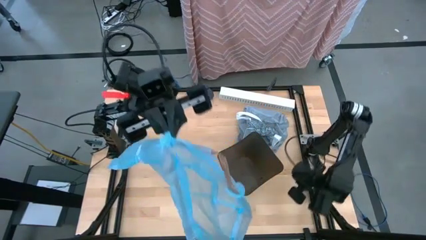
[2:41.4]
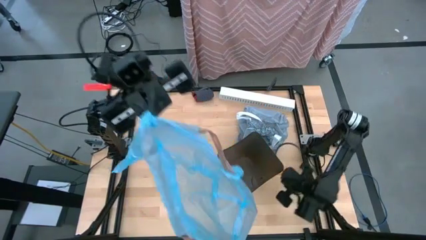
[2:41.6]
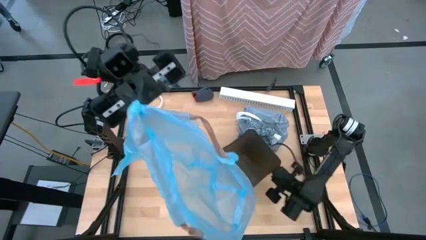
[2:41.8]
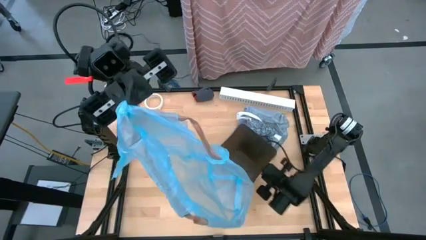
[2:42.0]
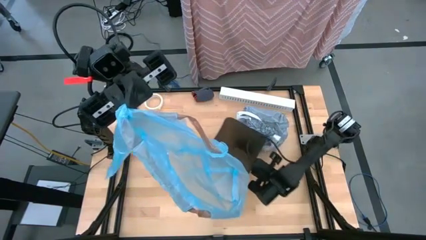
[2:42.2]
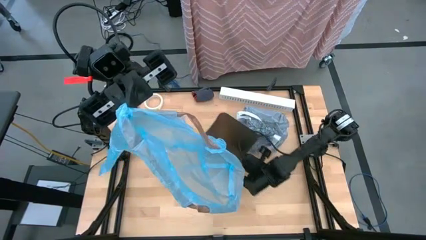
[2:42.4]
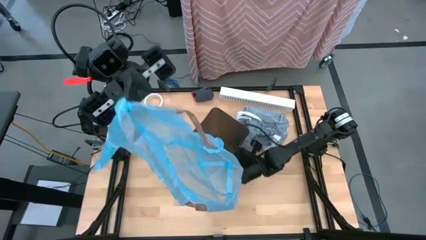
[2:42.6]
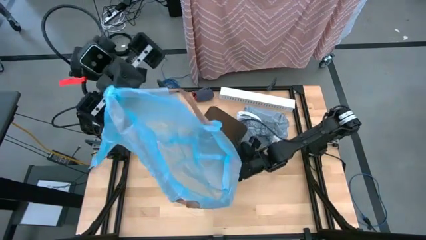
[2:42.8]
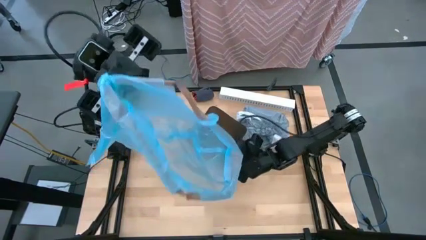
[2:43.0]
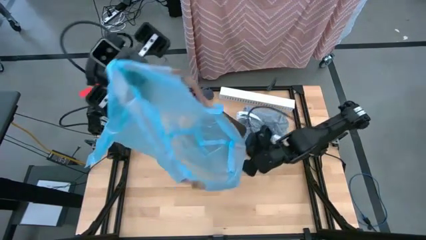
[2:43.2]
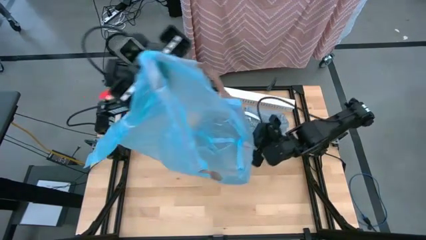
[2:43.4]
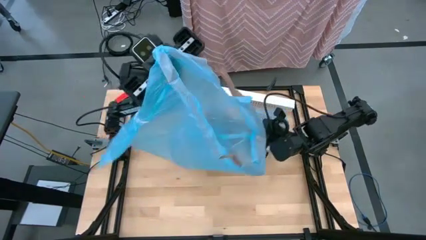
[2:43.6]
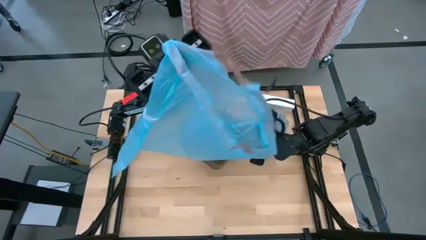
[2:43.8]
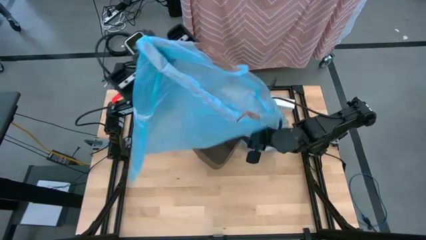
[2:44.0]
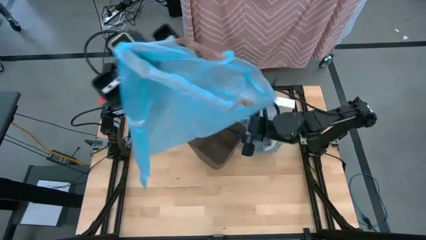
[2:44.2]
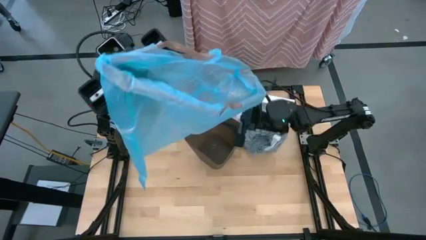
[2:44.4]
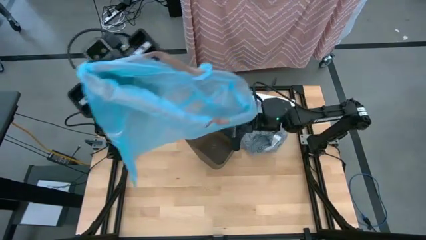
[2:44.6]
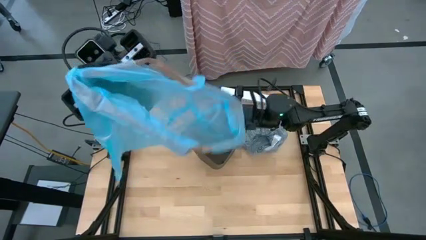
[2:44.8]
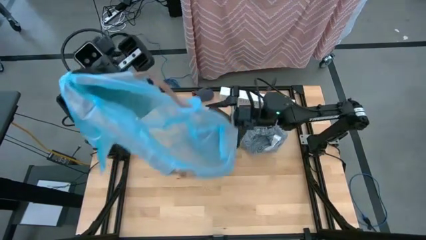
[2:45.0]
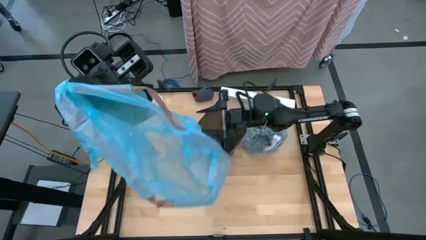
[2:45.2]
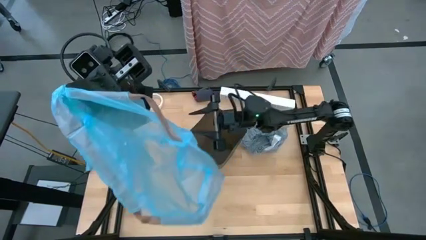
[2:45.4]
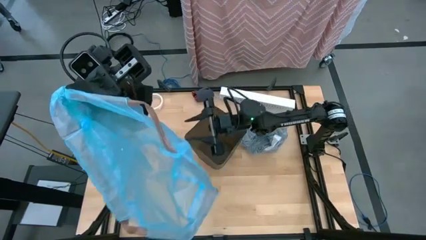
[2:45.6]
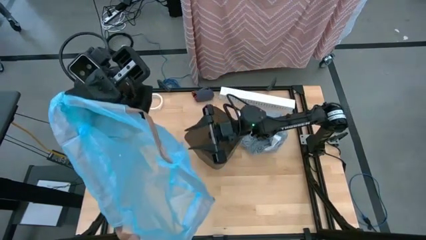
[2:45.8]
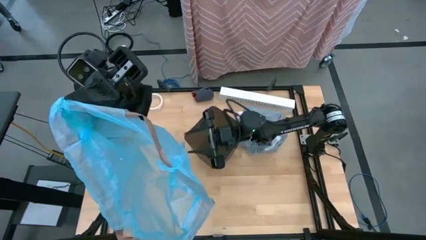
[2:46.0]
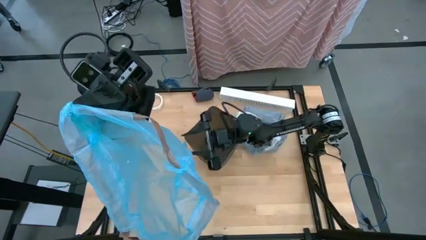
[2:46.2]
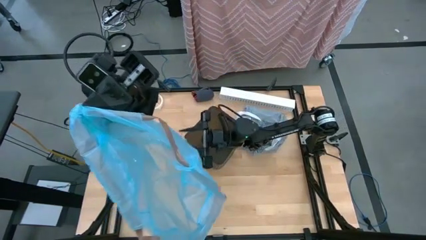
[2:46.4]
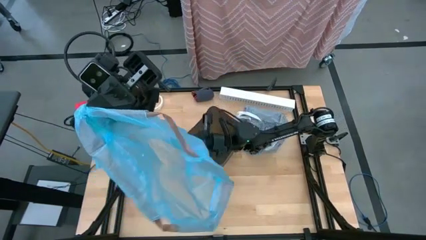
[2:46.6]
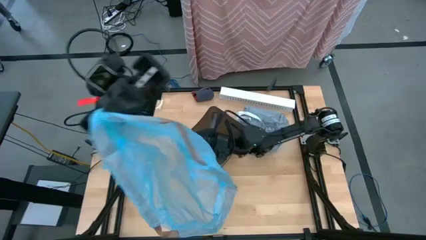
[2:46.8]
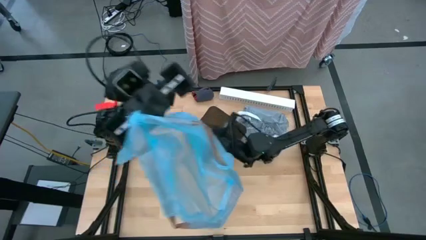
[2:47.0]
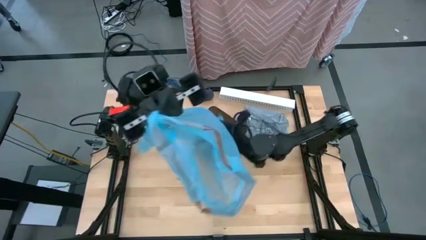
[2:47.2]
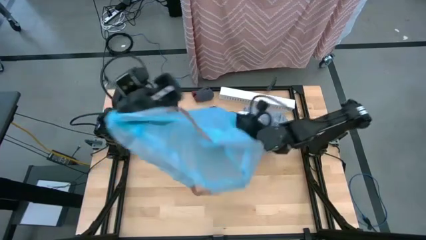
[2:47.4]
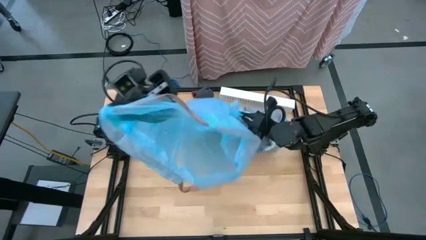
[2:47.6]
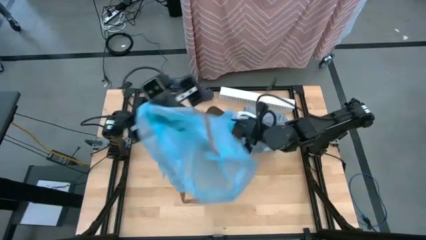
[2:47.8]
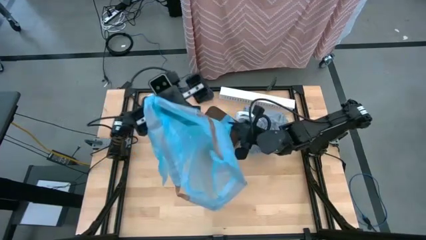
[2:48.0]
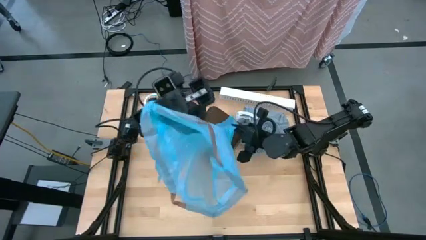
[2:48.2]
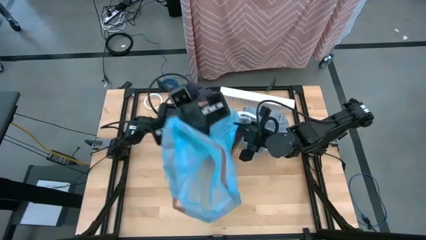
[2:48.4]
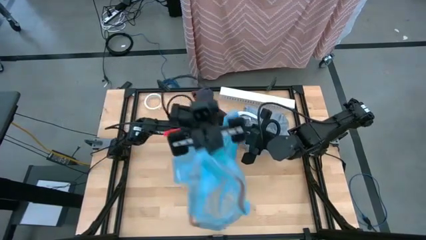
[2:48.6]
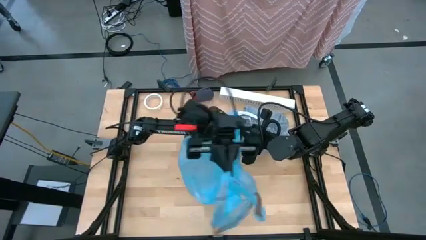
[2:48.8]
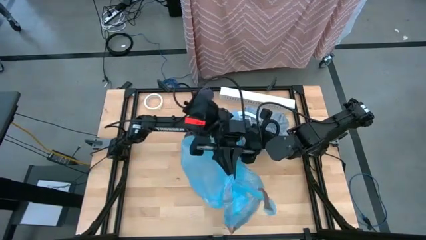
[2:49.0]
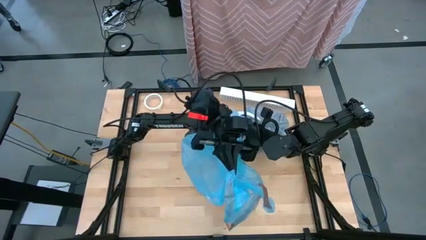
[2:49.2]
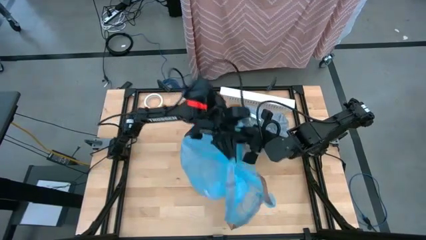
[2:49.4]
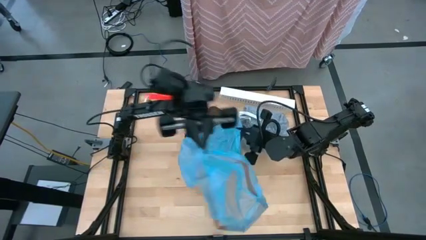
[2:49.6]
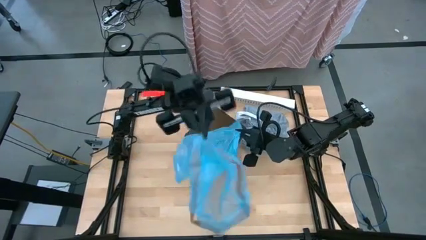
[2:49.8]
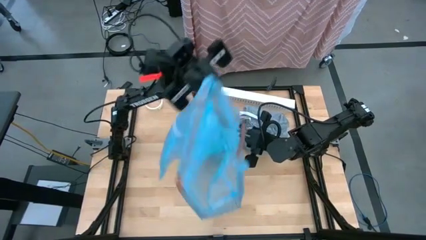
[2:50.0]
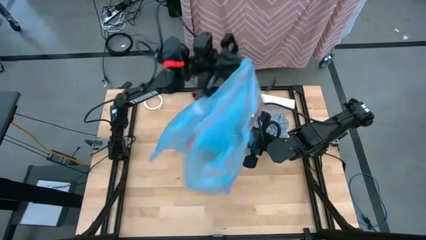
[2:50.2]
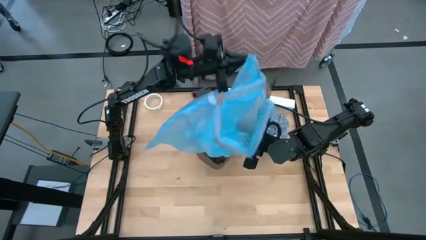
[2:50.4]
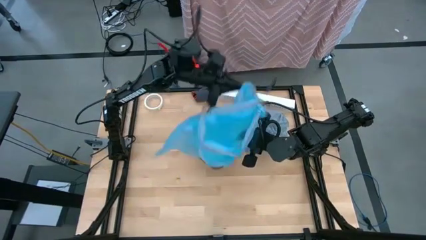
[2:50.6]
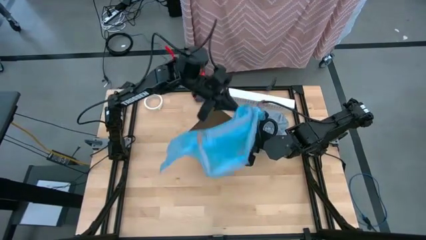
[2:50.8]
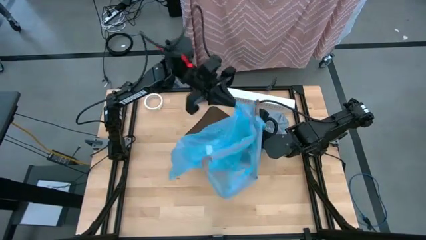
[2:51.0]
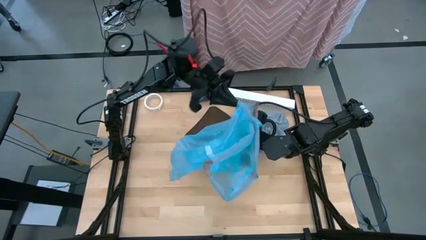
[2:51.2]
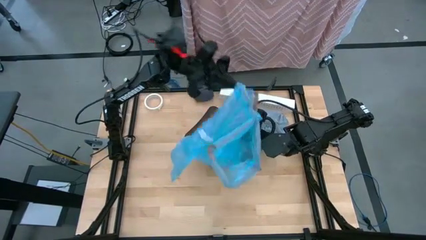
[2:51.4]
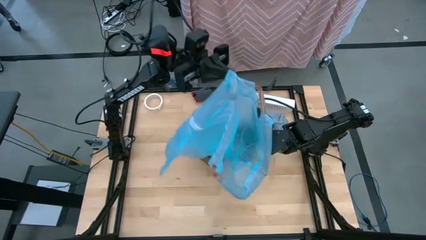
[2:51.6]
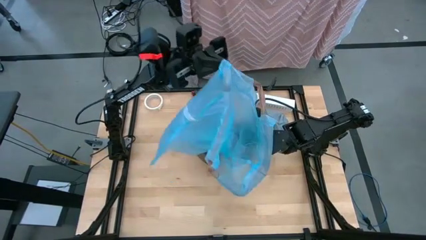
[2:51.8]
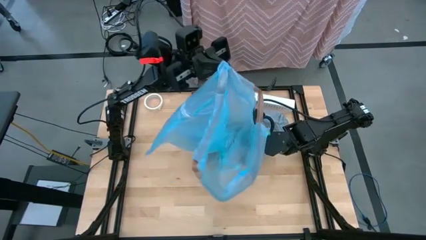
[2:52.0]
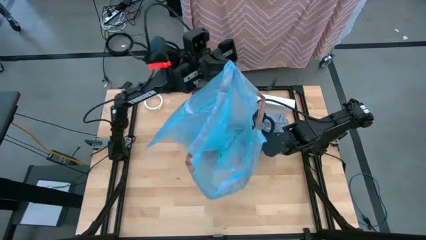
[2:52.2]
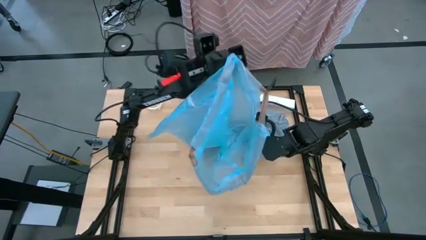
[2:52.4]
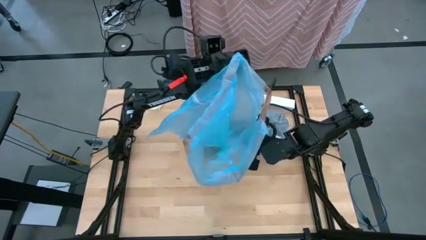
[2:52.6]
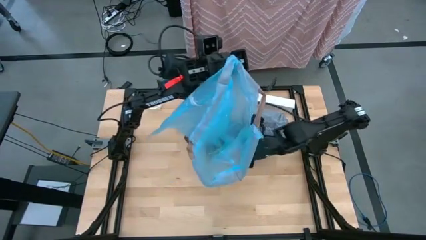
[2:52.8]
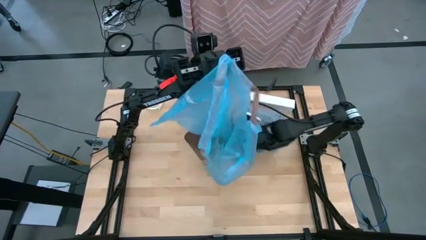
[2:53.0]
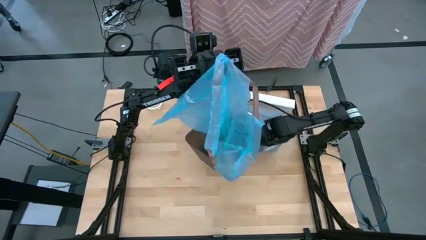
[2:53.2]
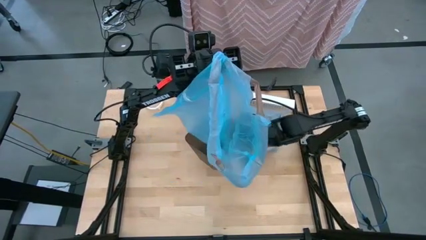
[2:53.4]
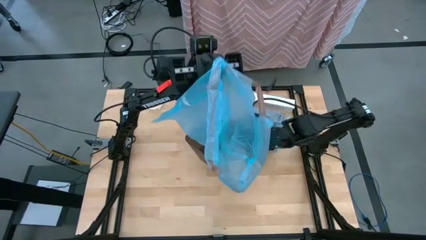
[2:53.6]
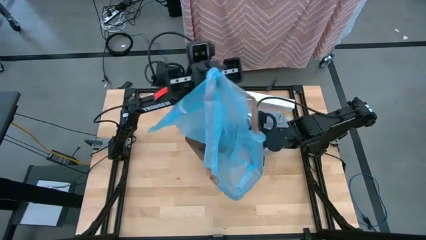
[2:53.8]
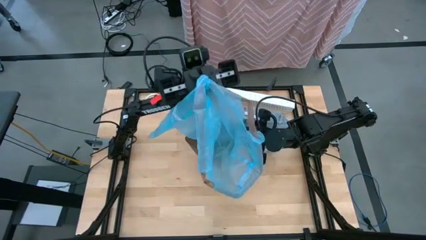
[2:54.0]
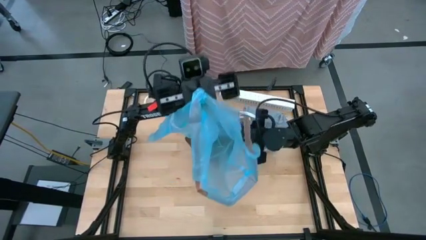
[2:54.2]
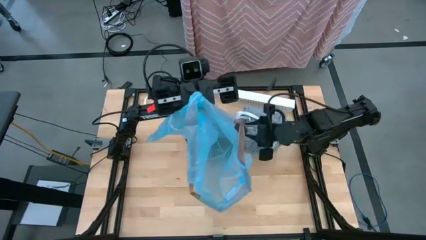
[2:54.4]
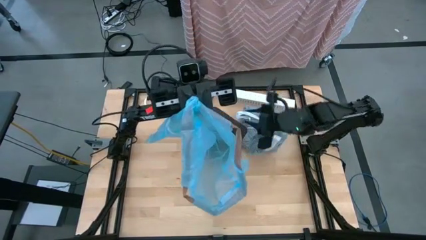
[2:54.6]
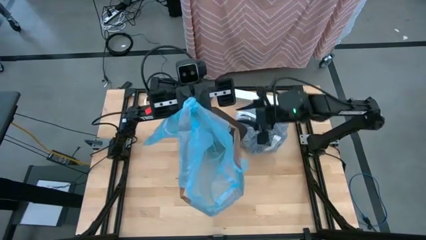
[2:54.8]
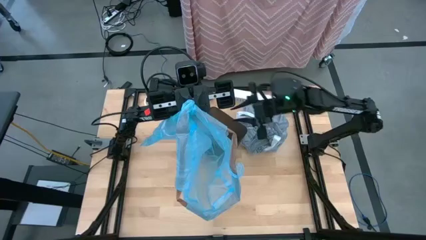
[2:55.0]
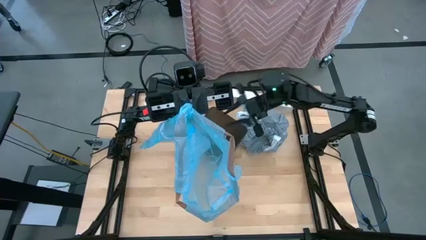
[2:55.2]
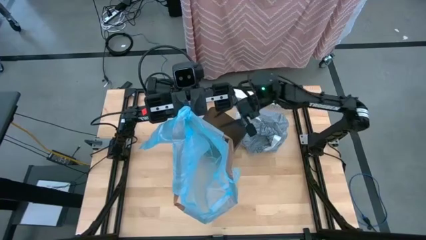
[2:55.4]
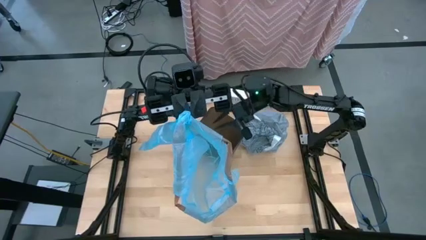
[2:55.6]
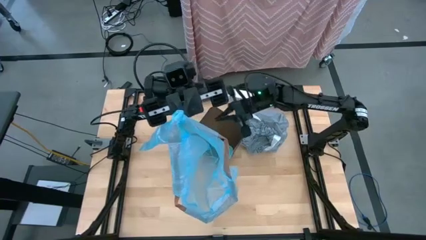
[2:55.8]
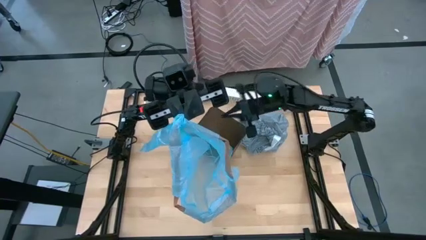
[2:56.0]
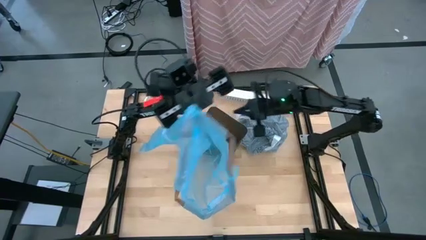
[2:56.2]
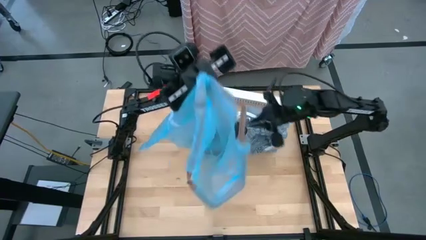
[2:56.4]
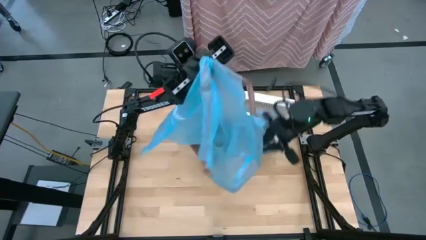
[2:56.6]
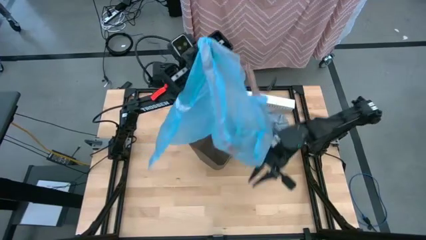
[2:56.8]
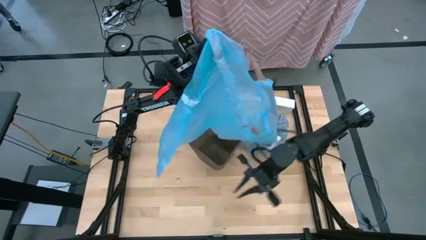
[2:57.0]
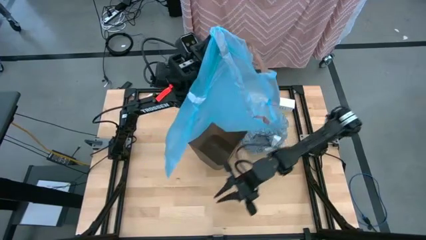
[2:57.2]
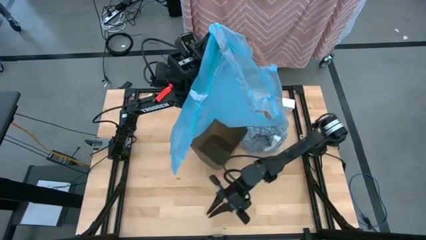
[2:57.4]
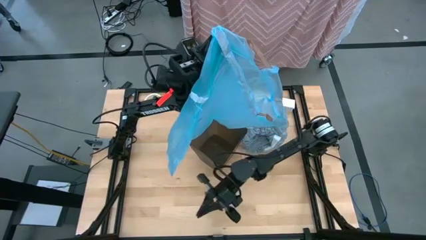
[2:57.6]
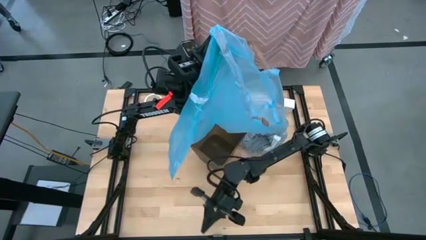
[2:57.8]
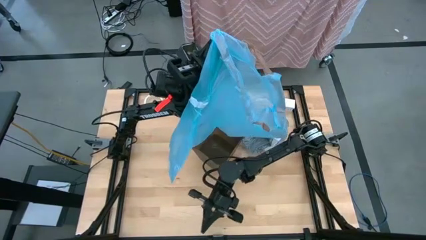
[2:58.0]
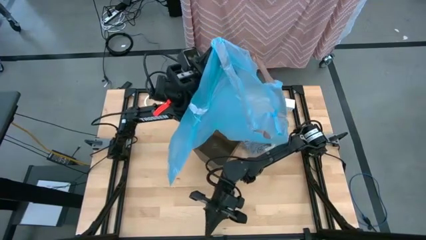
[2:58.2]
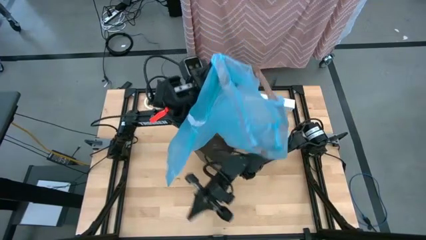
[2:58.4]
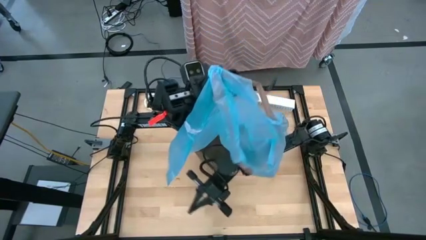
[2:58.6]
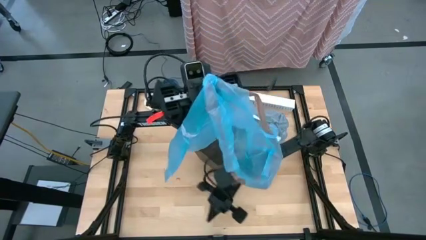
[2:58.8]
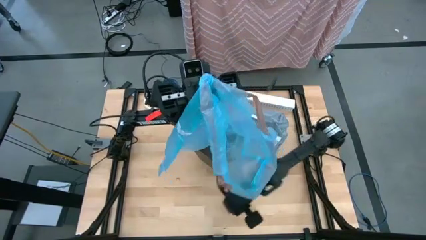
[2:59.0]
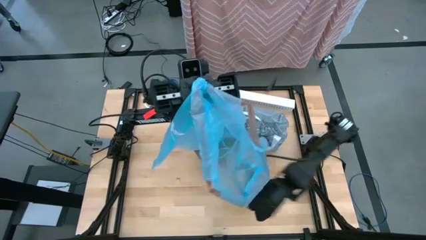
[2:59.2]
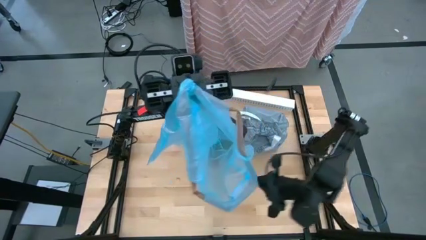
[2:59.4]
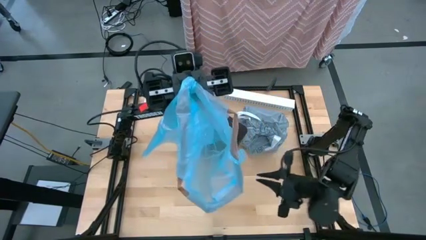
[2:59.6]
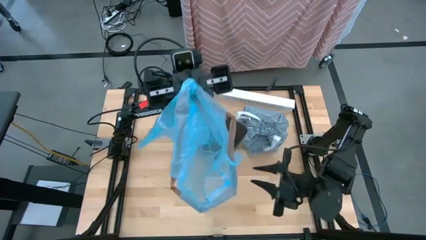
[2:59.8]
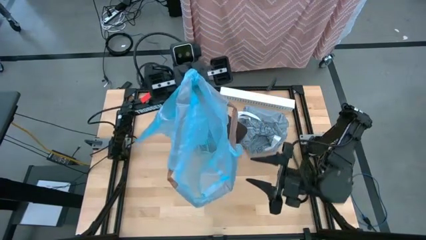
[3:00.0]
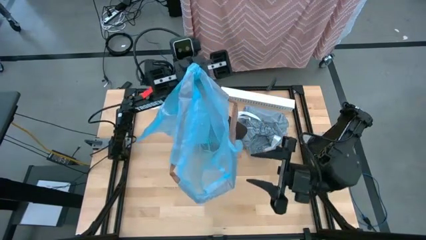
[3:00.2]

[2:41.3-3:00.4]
Task: place trash/remove bag and relplace
Insert the new blue trash bag into the black trash bin
